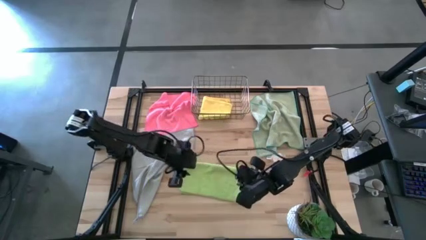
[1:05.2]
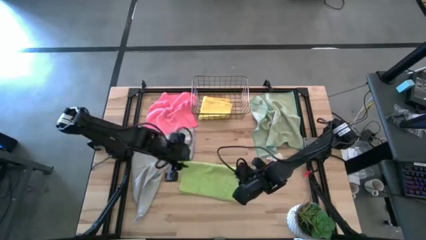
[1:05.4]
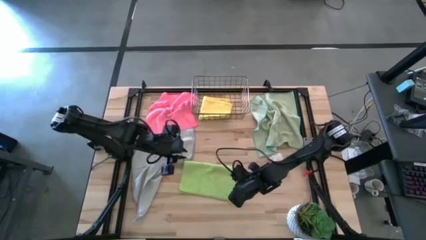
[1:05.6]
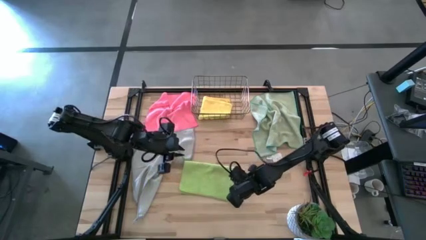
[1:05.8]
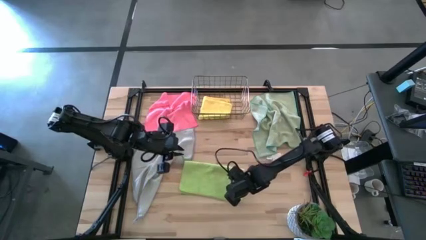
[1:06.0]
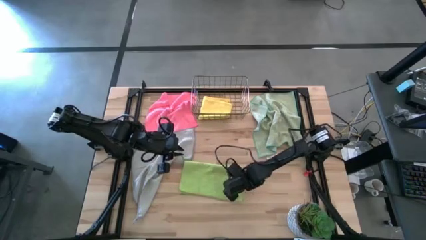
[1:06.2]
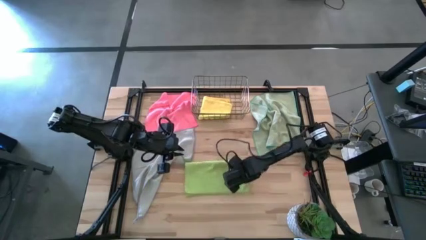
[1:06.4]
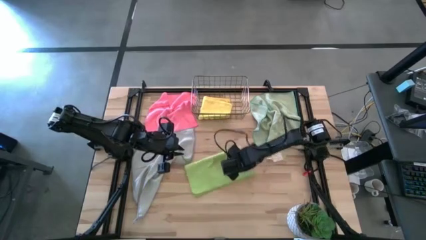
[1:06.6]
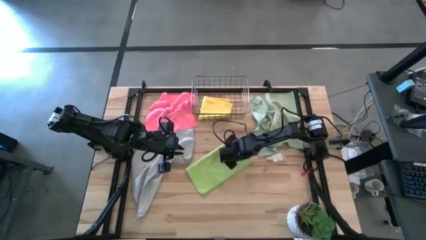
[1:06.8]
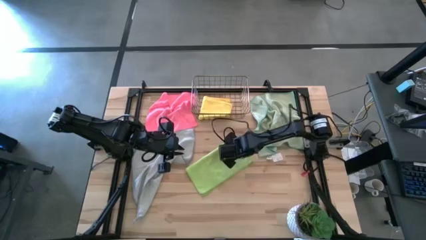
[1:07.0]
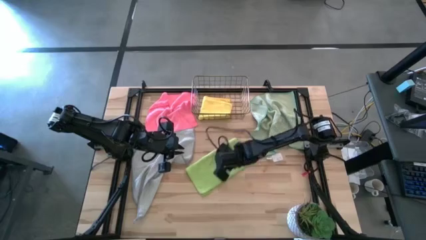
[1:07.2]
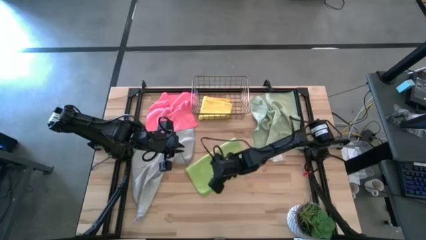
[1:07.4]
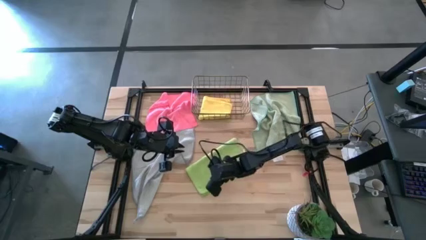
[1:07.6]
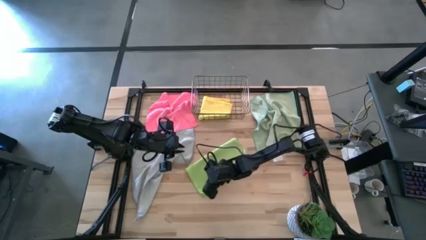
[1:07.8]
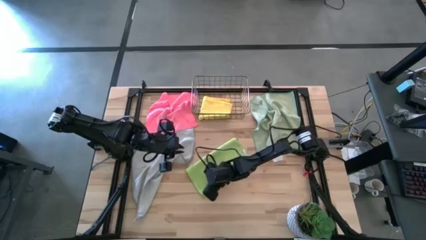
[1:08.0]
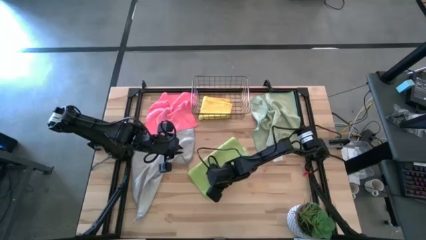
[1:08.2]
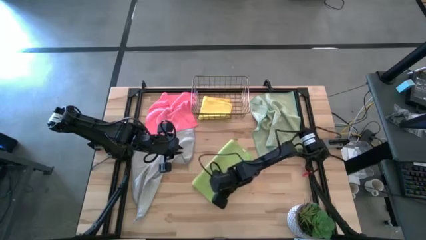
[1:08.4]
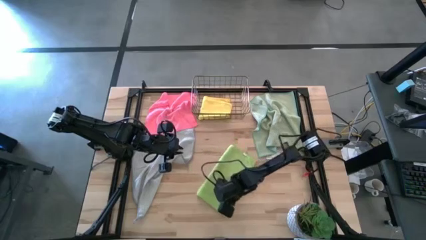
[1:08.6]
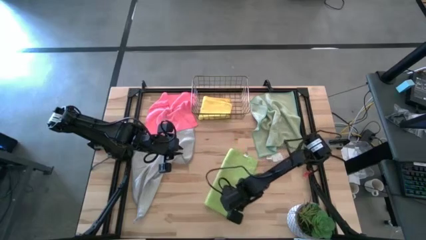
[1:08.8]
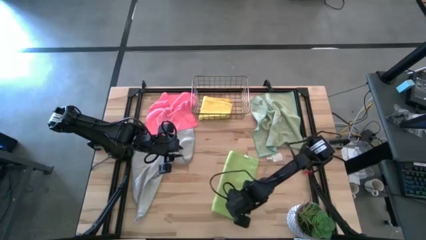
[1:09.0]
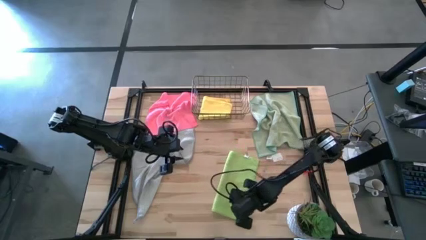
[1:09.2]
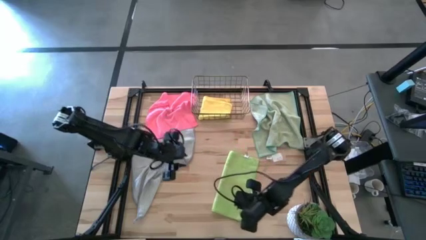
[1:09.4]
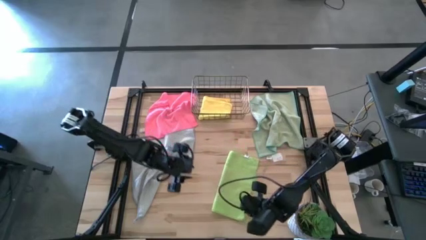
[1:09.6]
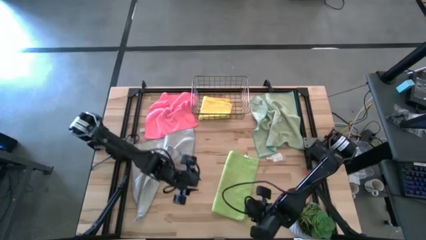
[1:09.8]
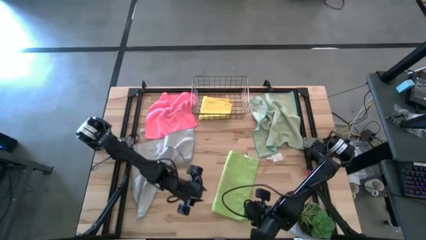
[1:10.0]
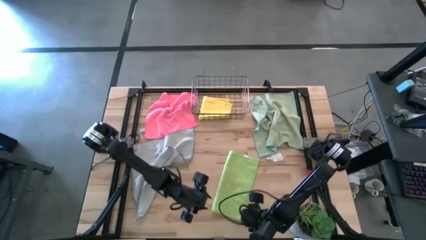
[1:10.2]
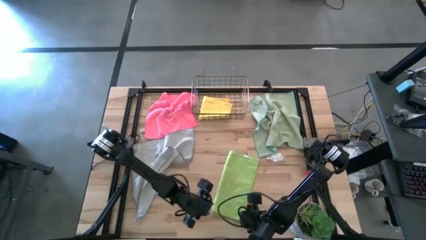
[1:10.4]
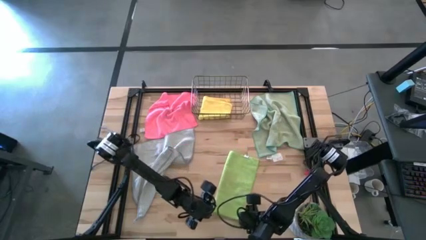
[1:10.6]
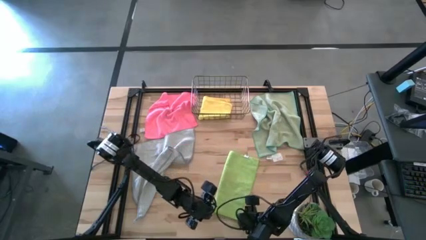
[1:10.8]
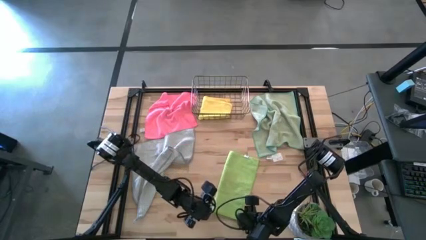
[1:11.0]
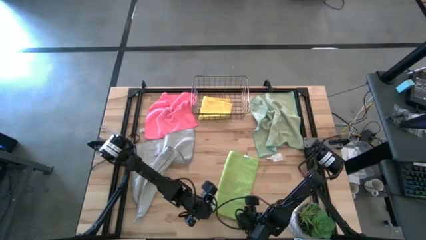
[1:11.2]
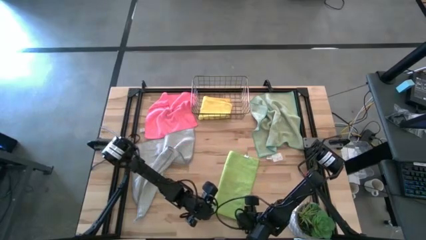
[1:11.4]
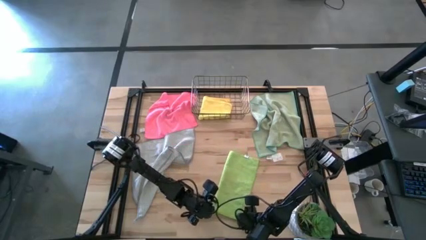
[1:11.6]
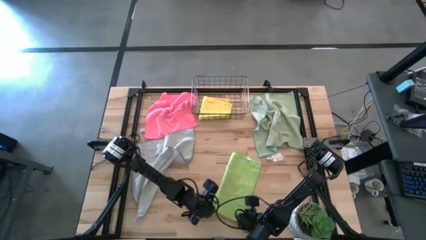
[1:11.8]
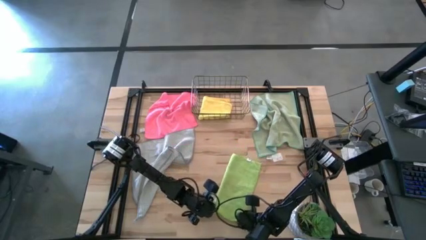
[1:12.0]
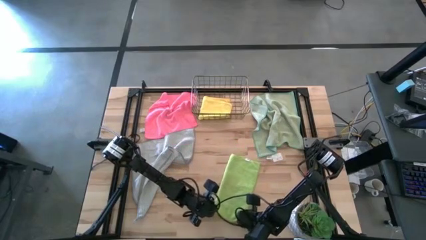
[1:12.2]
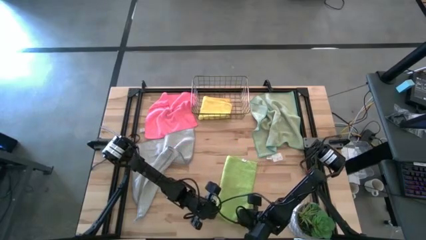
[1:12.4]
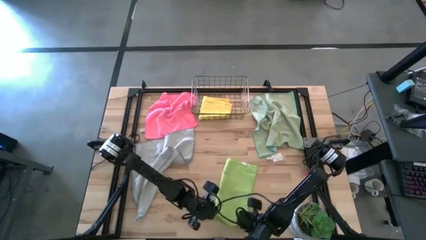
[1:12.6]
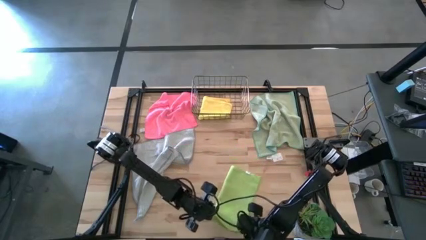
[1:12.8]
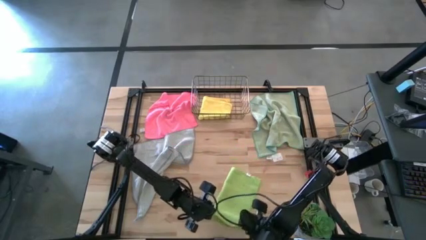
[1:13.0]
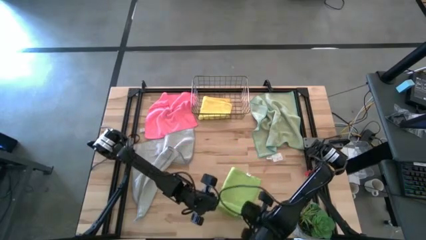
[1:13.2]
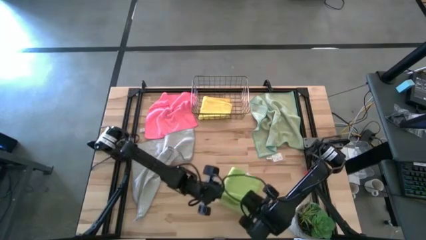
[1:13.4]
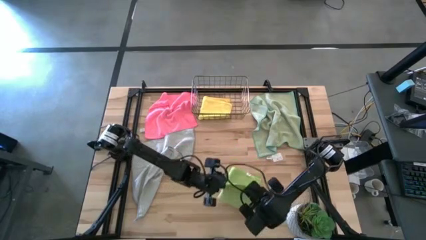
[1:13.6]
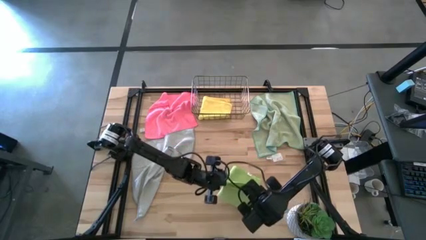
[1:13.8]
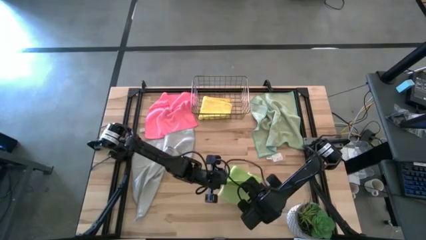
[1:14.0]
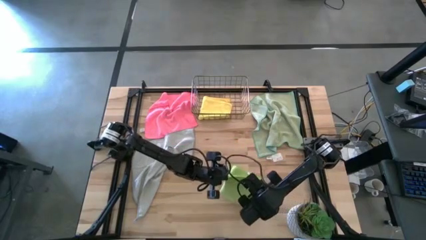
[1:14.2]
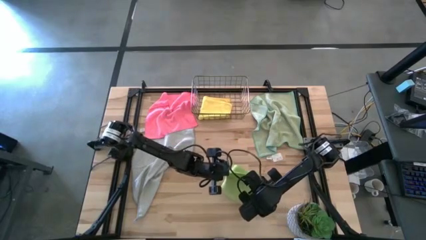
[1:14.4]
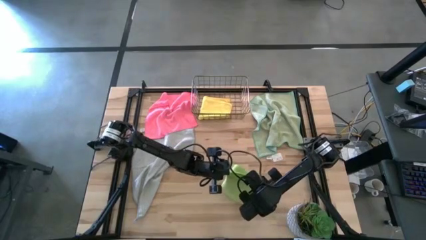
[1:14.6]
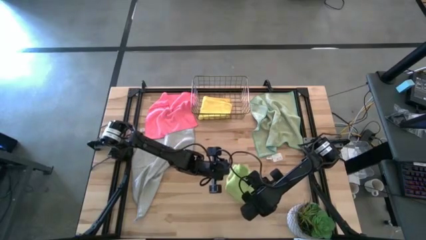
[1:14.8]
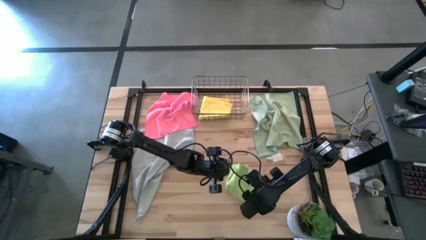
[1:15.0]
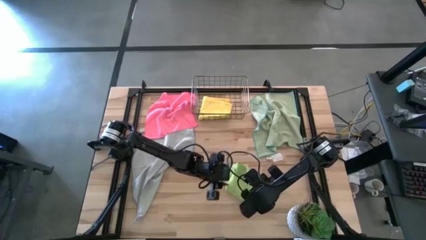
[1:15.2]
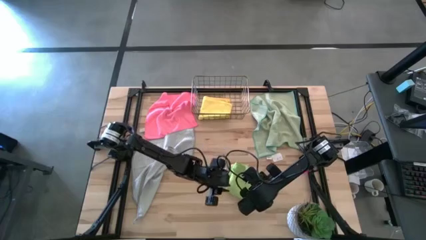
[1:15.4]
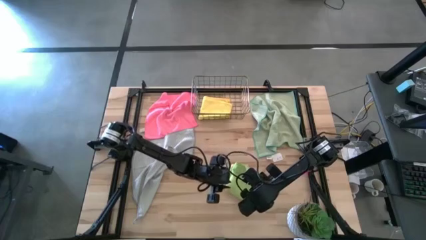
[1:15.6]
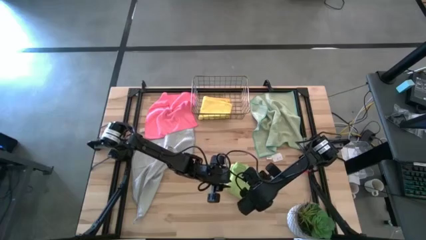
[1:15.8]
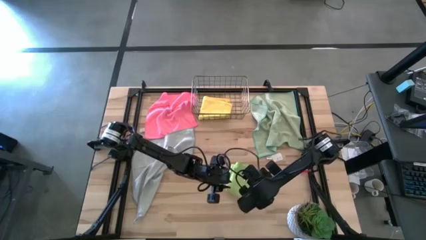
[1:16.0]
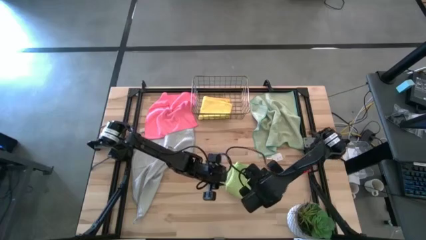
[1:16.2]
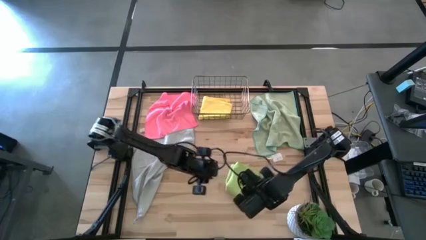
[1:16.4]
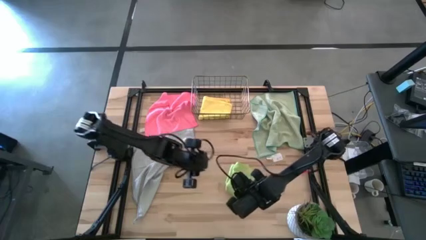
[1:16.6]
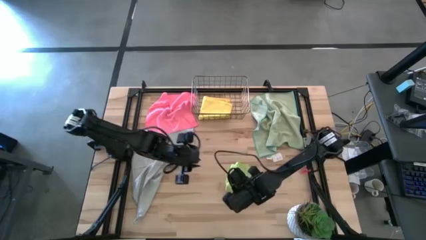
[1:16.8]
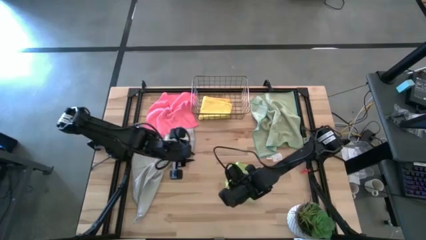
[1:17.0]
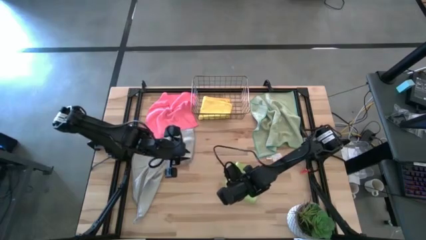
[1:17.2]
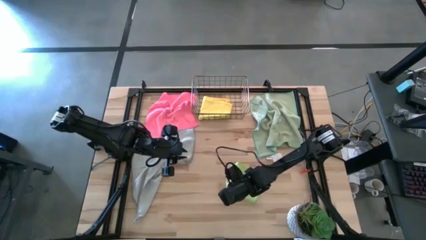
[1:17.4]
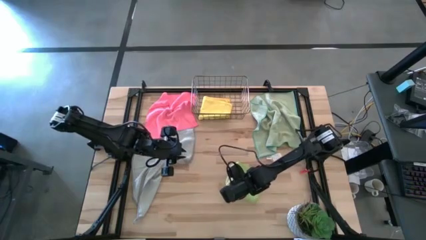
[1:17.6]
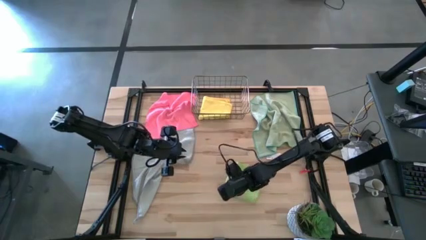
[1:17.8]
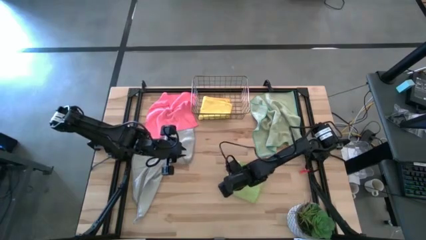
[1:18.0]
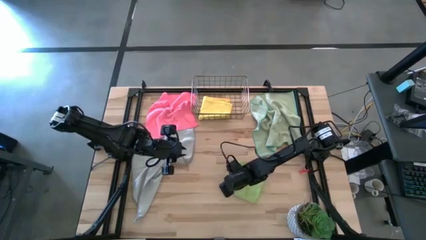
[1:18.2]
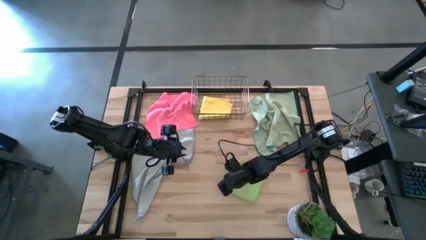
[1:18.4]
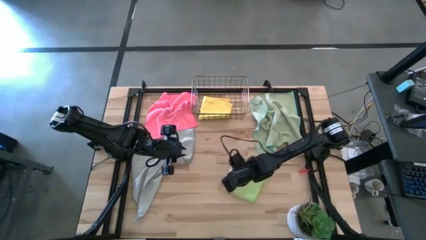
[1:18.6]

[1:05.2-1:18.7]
Task: Fold microfiber towels
Fold the green towel
